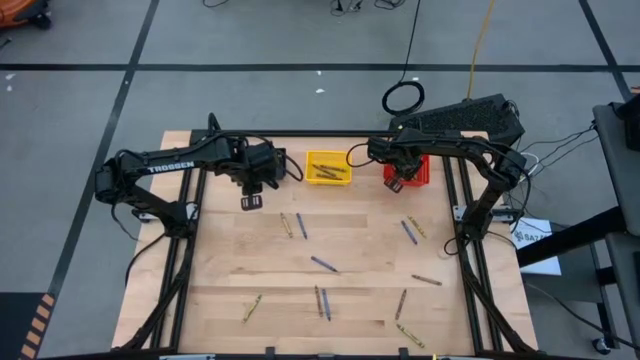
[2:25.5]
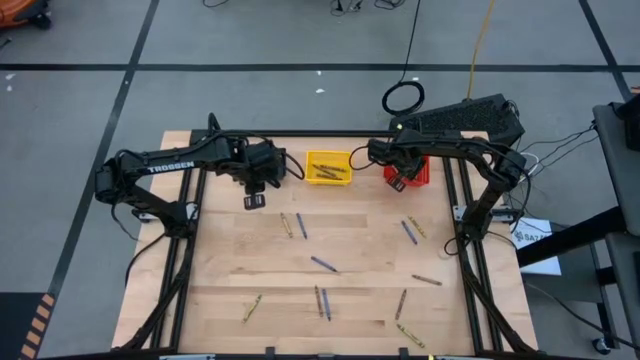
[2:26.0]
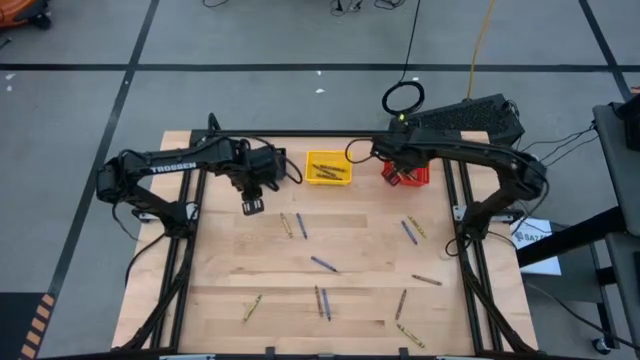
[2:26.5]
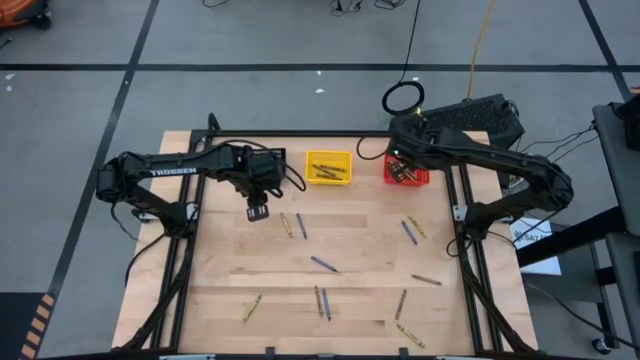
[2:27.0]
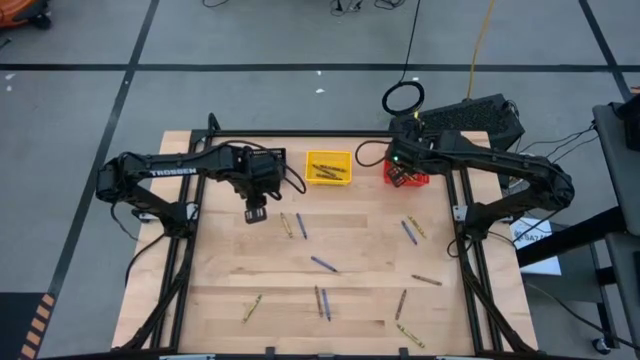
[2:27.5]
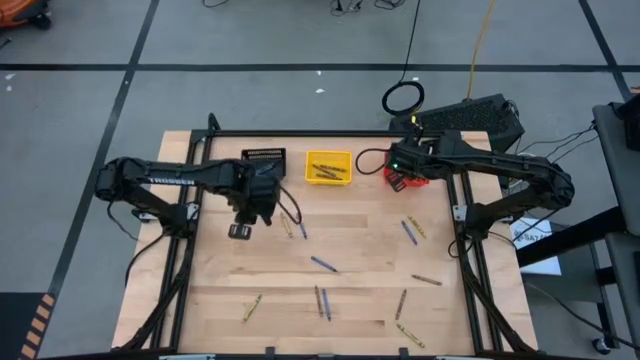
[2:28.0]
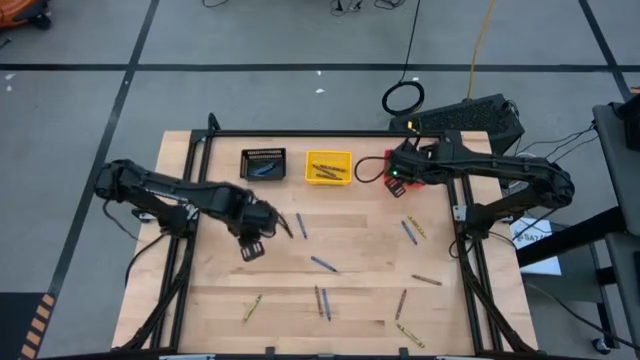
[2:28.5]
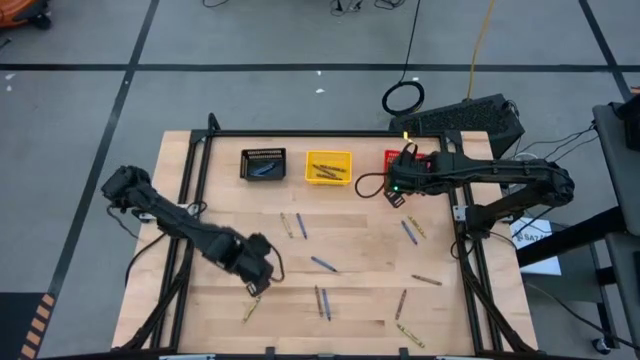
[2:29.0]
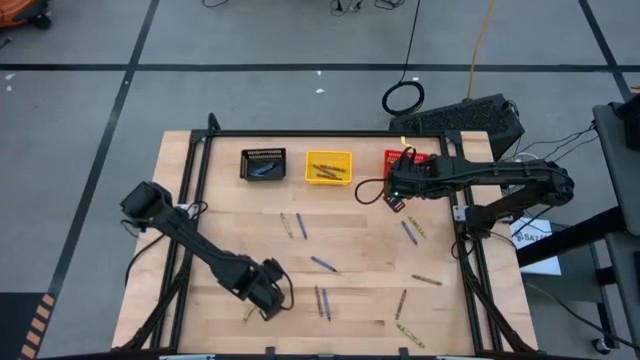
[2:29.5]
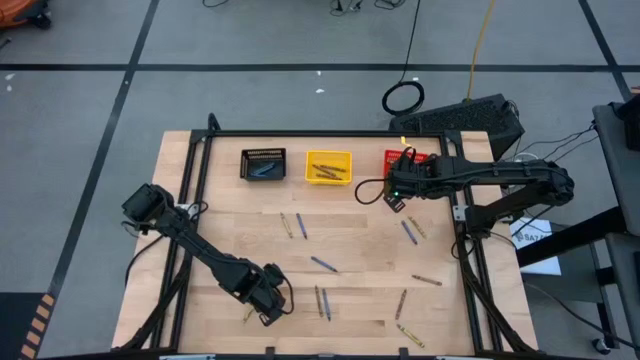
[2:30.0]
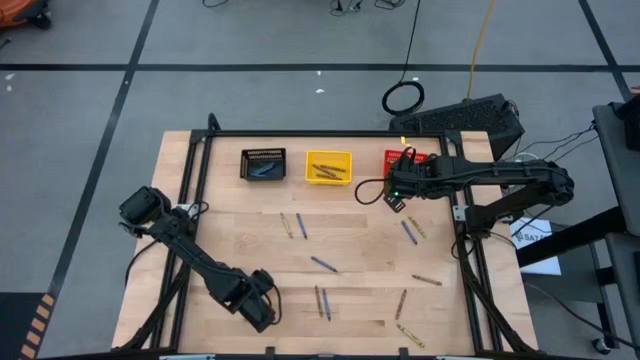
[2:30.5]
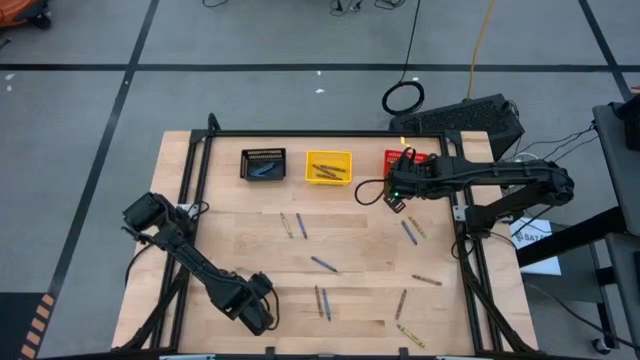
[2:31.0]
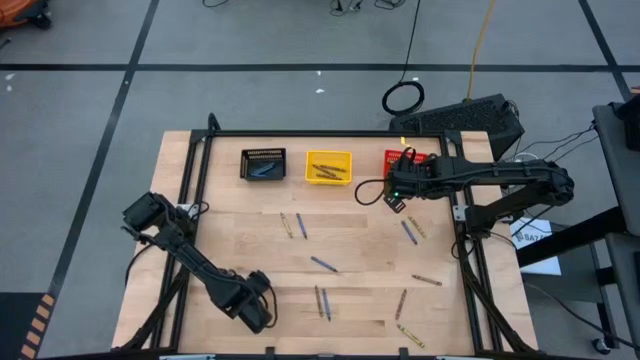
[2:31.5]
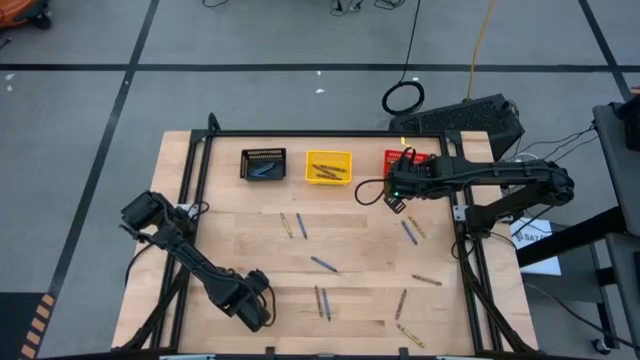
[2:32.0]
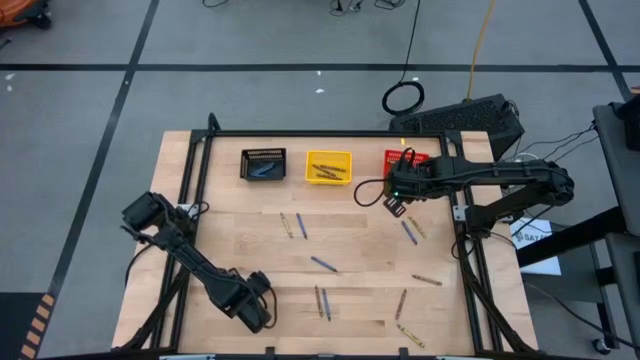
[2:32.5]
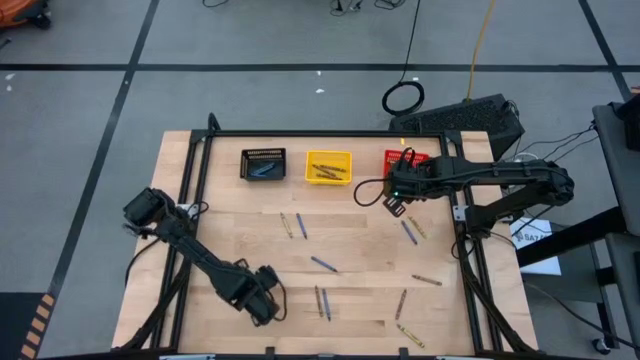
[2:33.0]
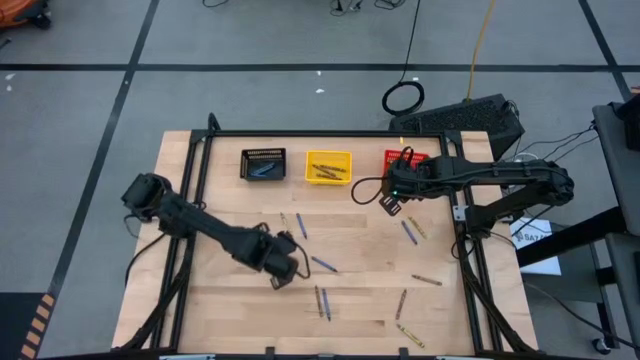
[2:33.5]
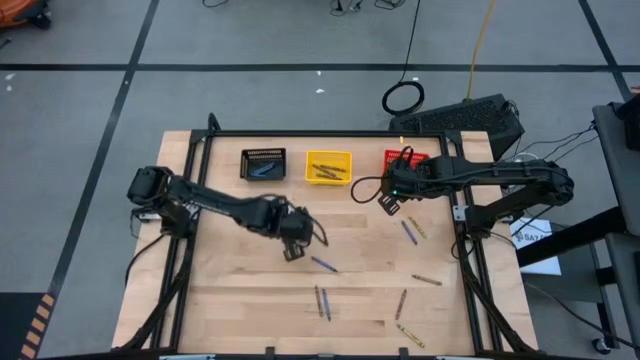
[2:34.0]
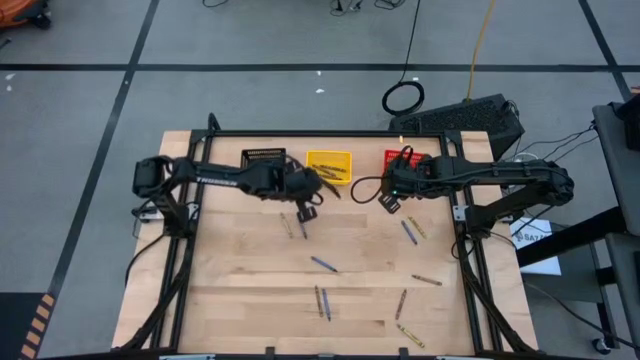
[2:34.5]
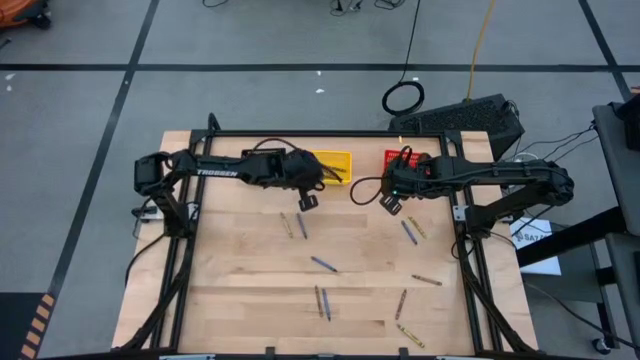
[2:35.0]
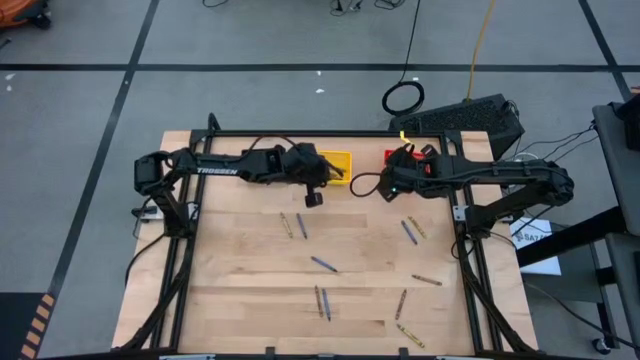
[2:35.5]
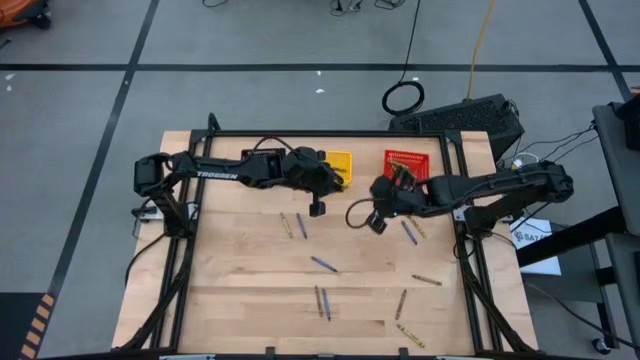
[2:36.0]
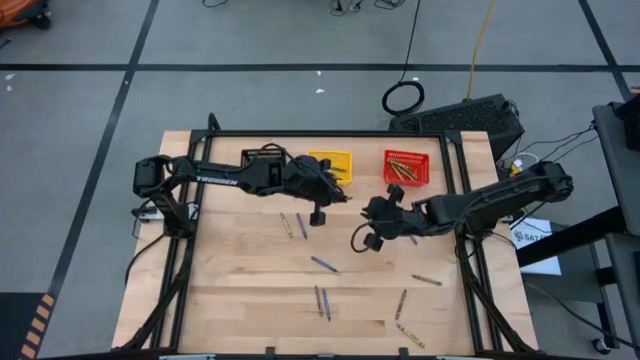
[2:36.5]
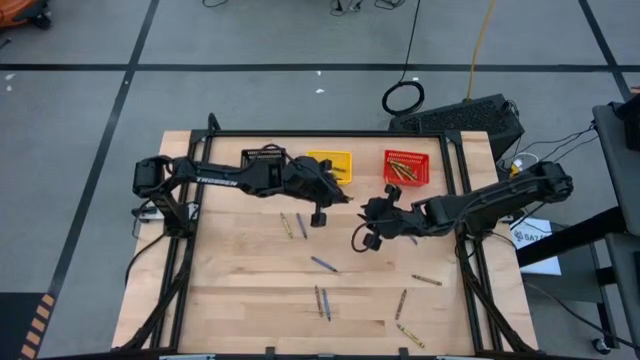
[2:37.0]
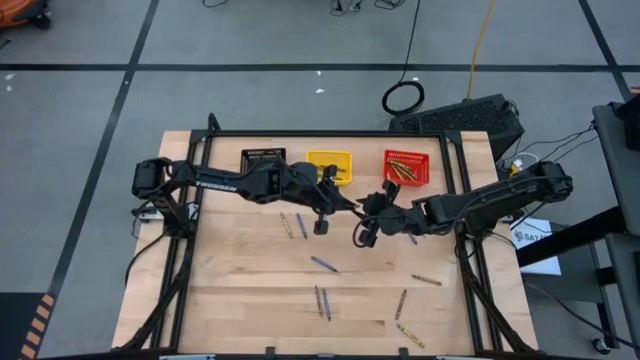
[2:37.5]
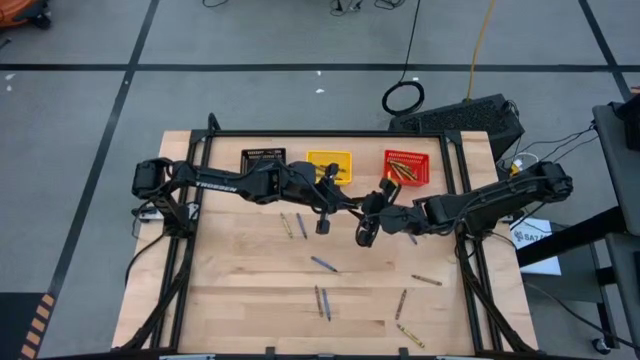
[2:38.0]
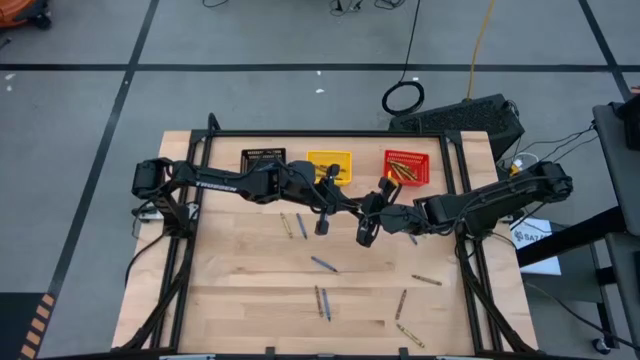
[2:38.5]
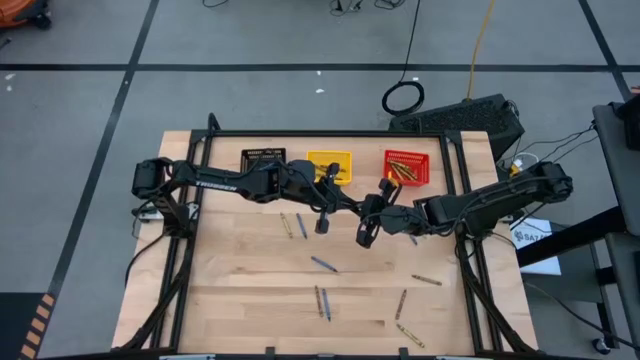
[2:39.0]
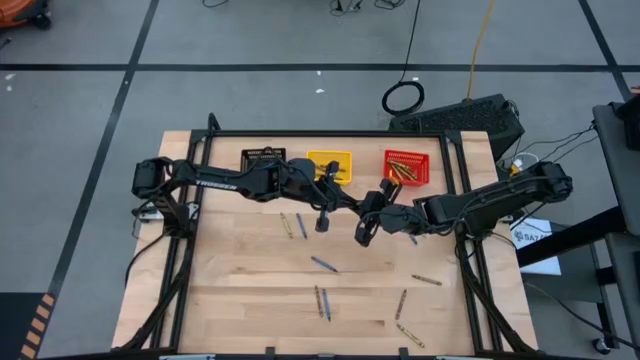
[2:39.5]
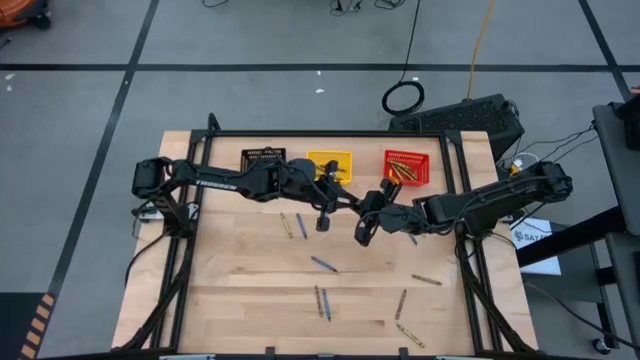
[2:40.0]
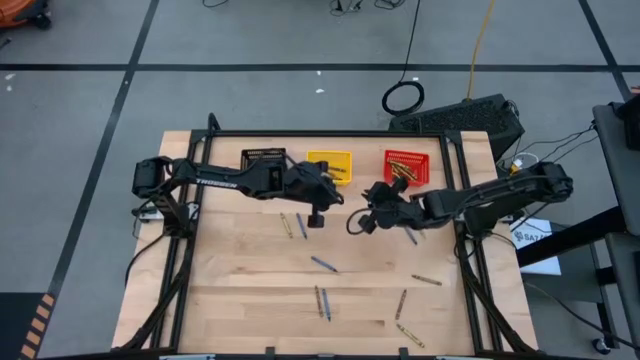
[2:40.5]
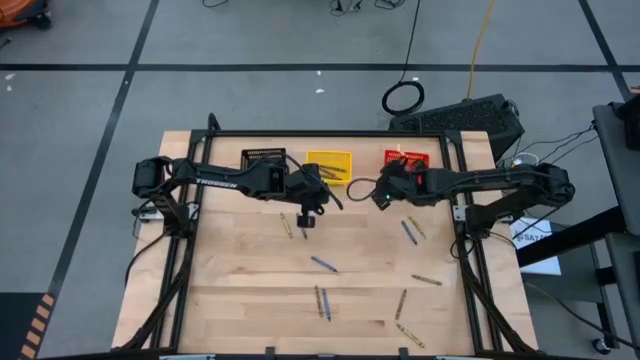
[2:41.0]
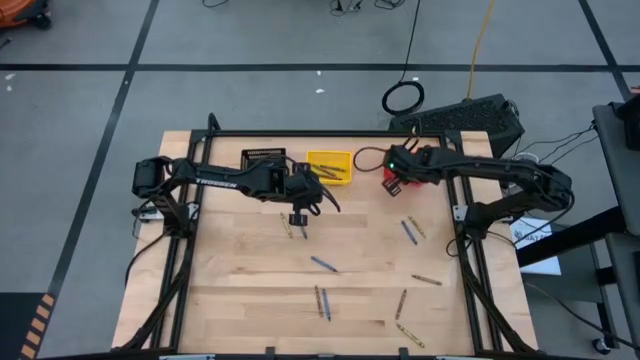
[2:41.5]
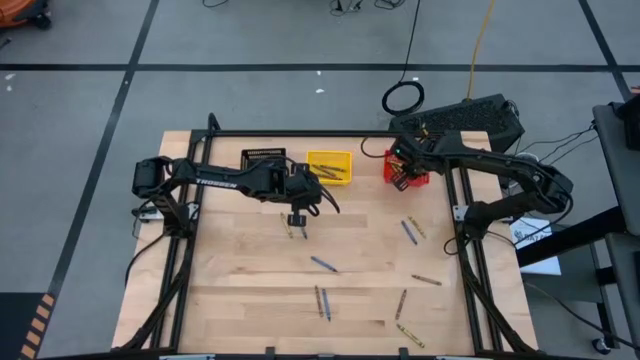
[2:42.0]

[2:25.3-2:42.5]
Task: Sort crayons
Put the green crayon into the red bin

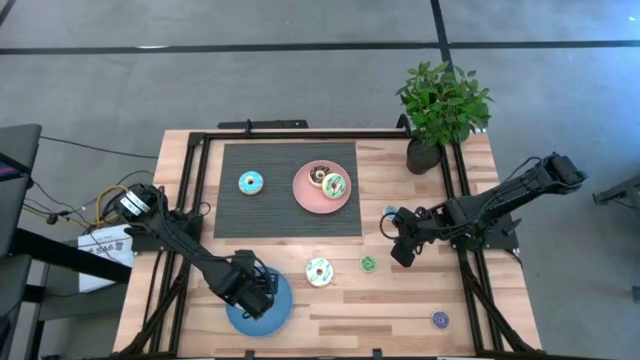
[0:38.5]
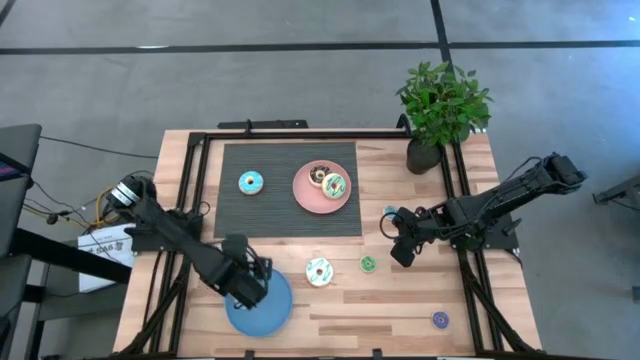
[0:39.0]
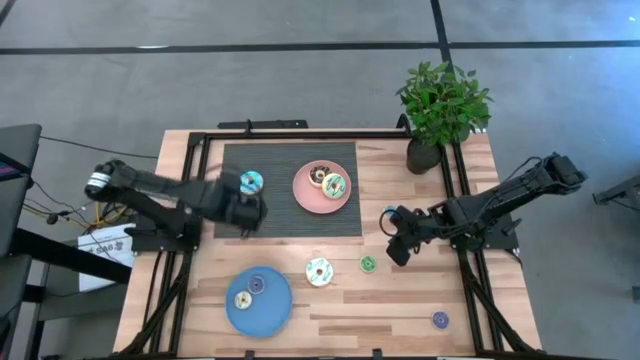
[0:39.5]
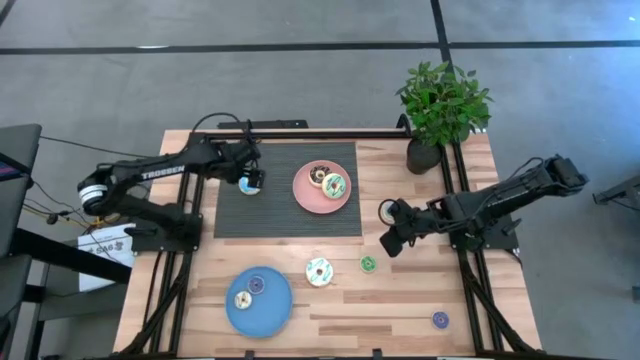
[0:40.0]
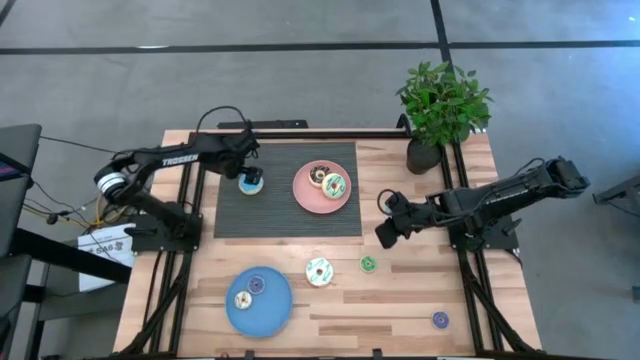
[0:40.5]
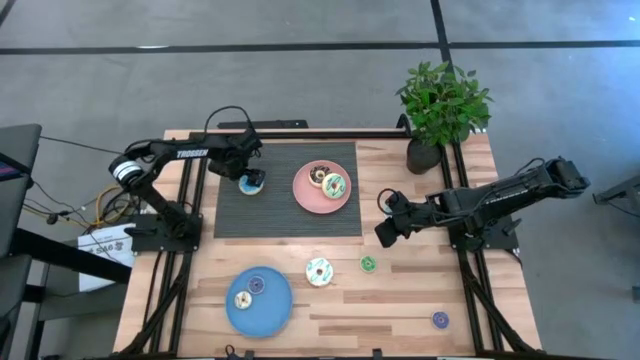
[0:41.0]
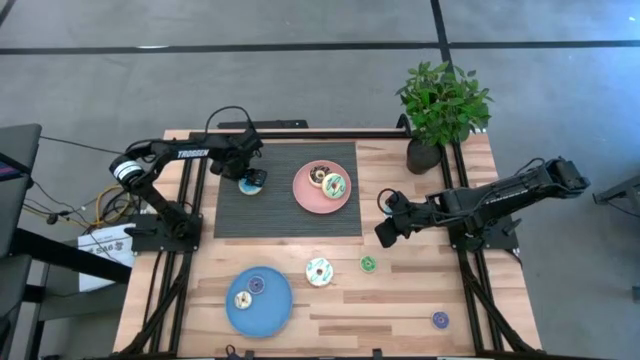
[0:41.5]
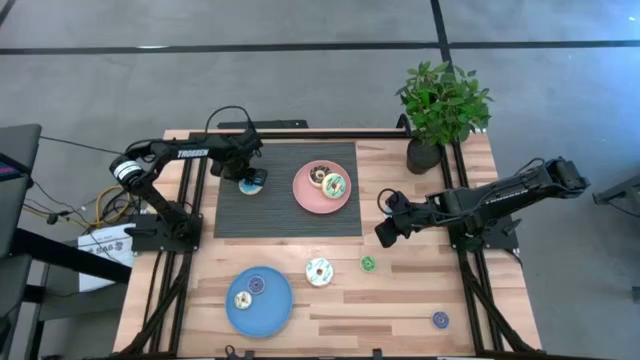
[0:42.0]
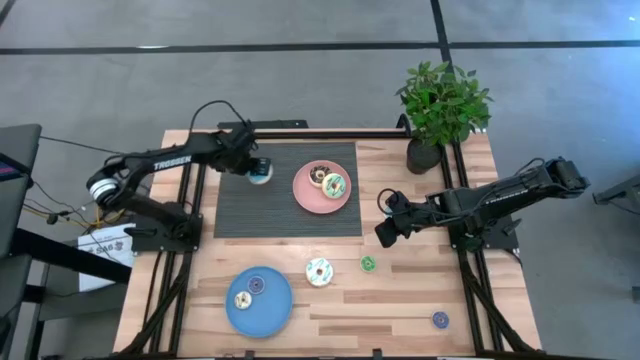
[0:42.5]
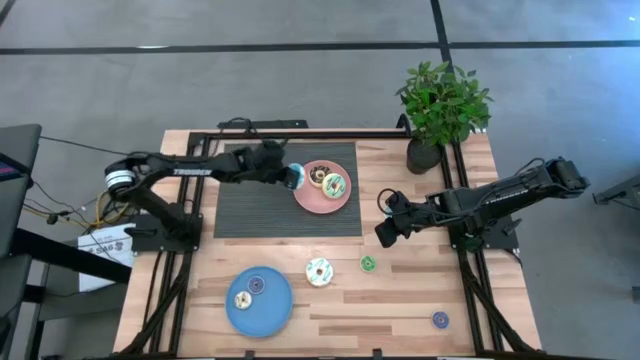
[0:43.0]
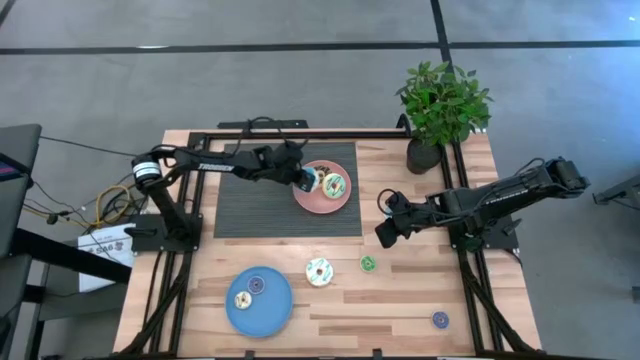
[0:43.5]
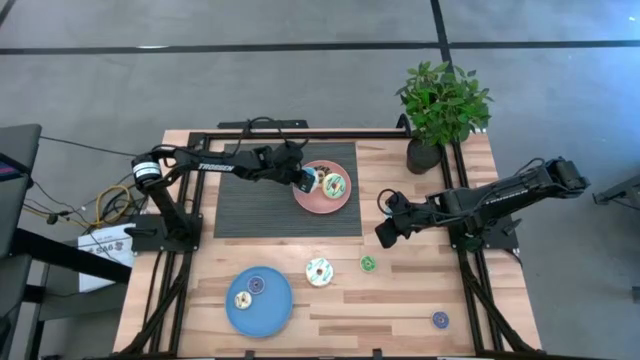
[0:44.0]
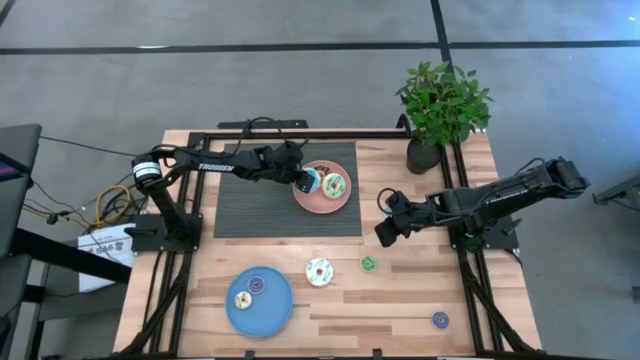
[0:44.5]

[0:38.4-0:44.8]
Task: Pick & Place donuts
Put the large blue donut on the pink plate
